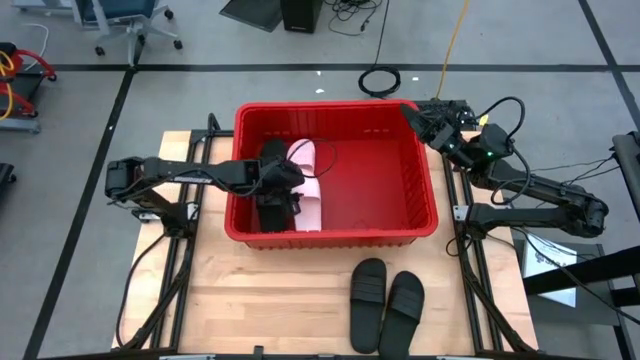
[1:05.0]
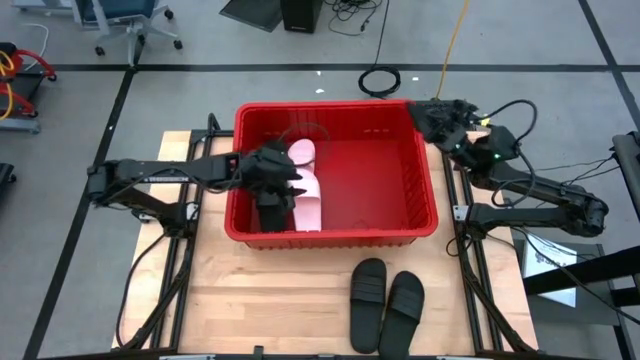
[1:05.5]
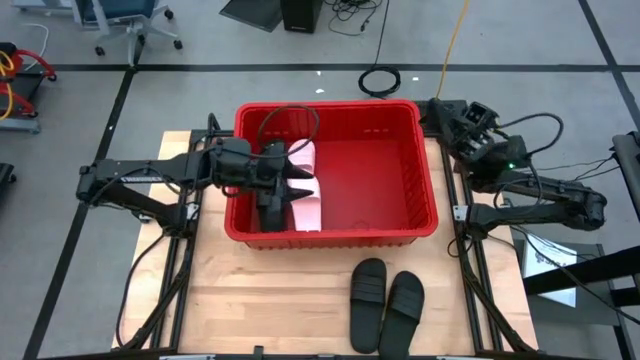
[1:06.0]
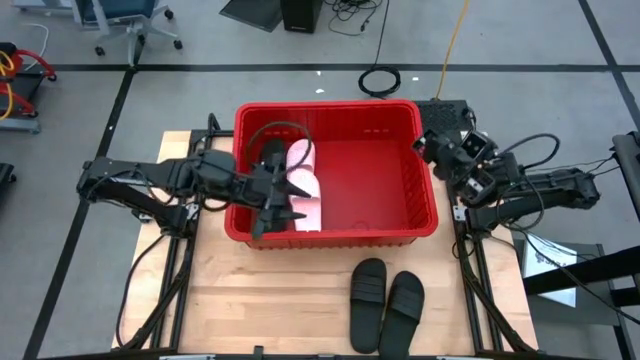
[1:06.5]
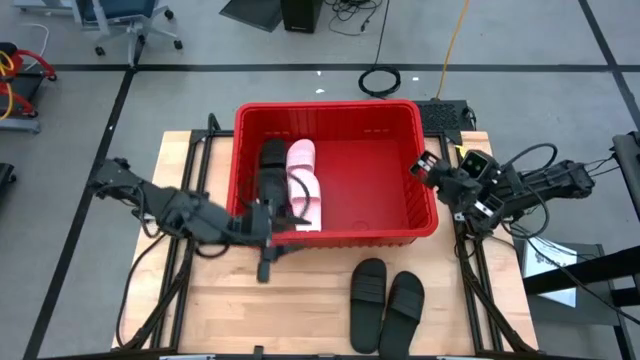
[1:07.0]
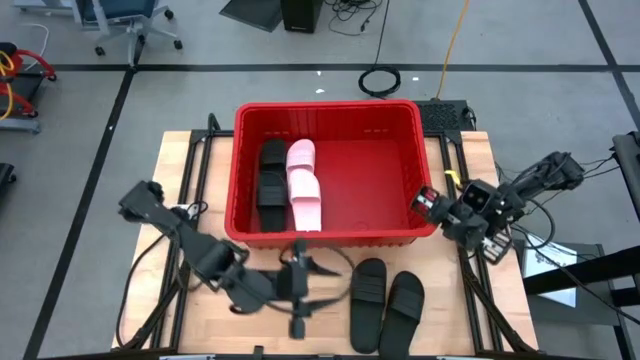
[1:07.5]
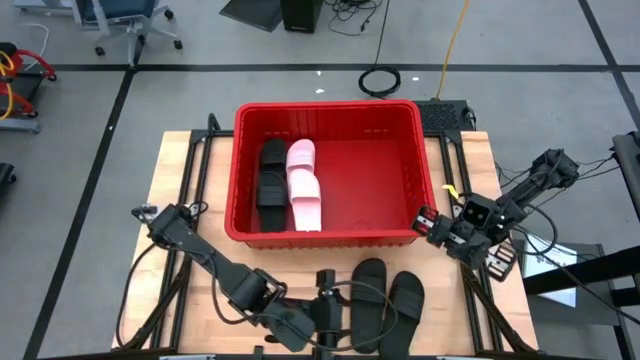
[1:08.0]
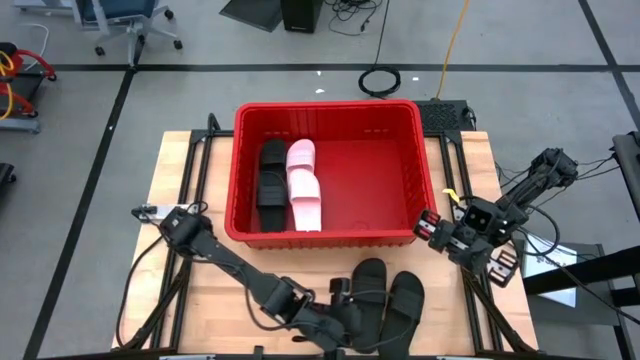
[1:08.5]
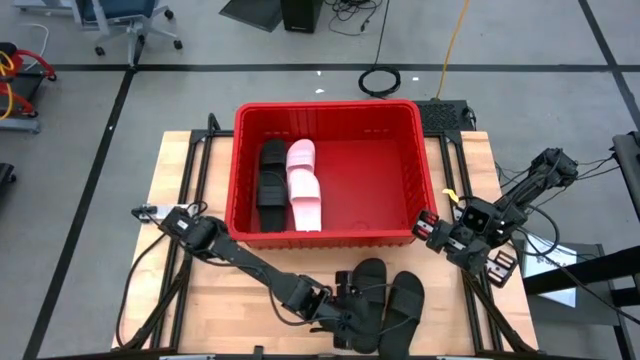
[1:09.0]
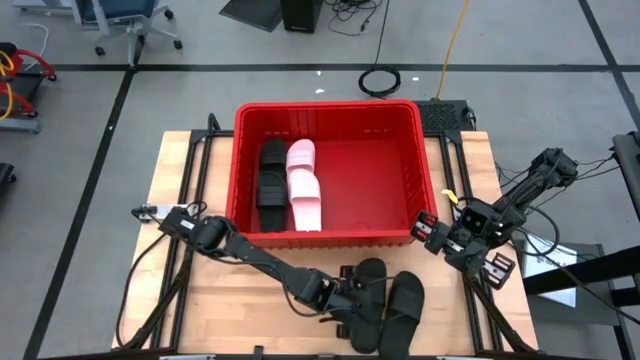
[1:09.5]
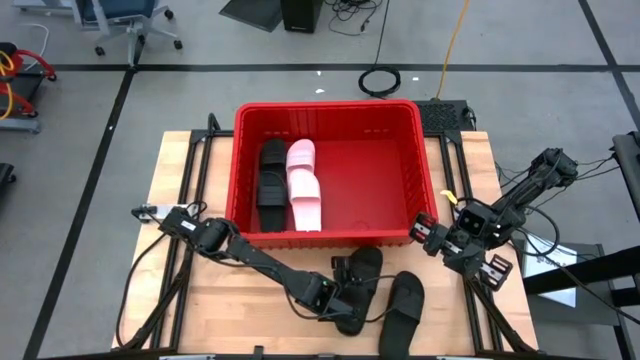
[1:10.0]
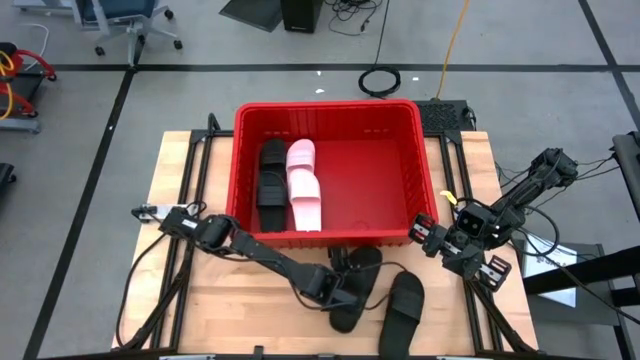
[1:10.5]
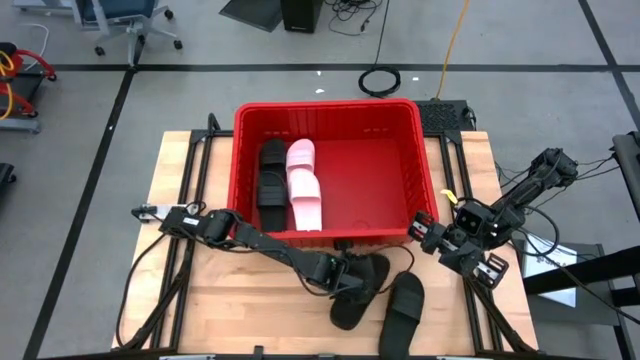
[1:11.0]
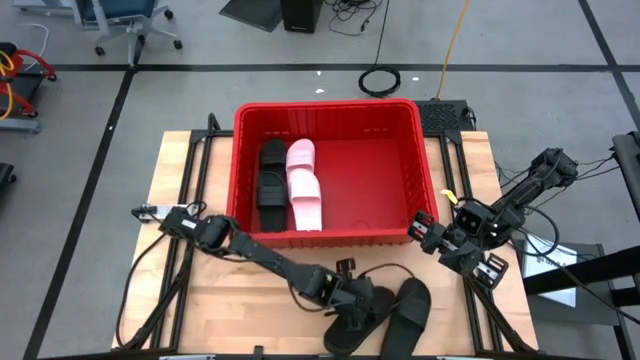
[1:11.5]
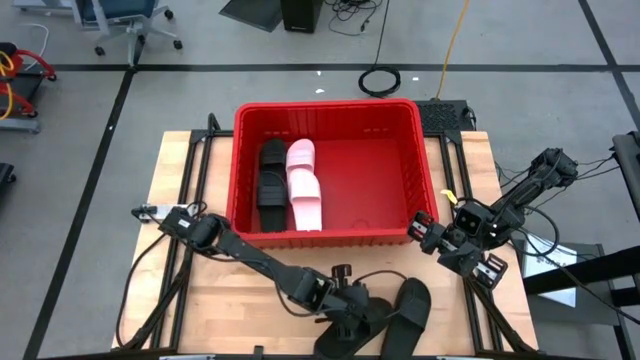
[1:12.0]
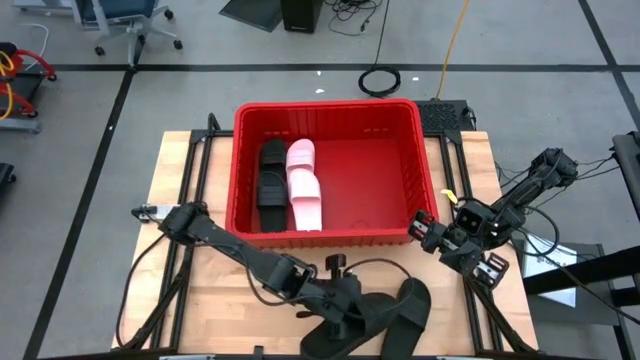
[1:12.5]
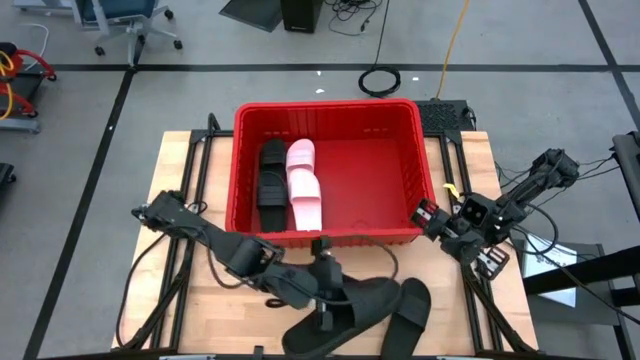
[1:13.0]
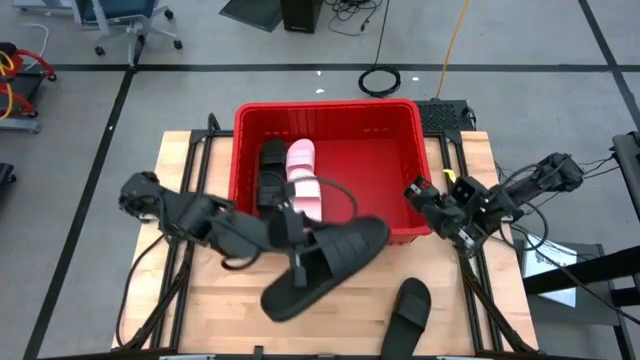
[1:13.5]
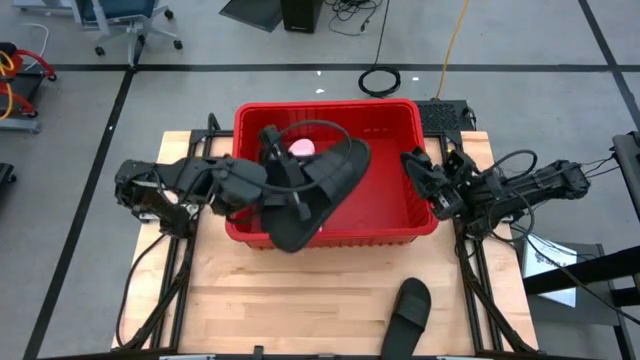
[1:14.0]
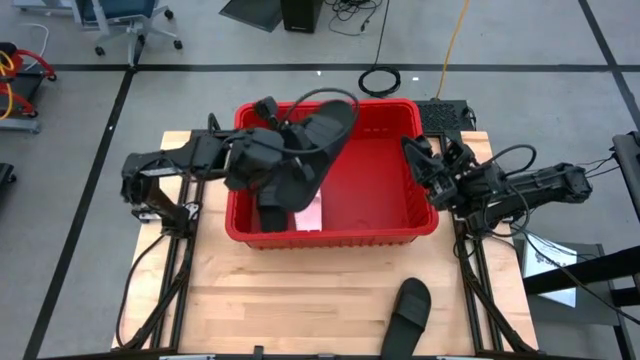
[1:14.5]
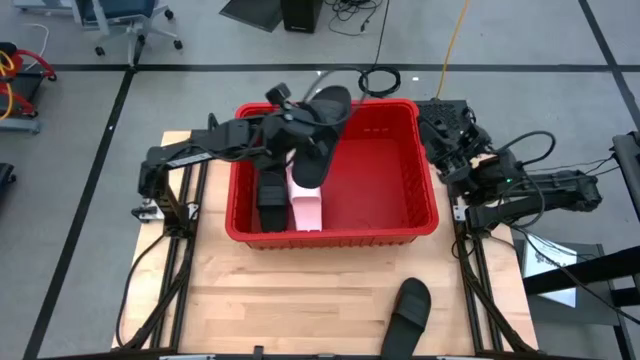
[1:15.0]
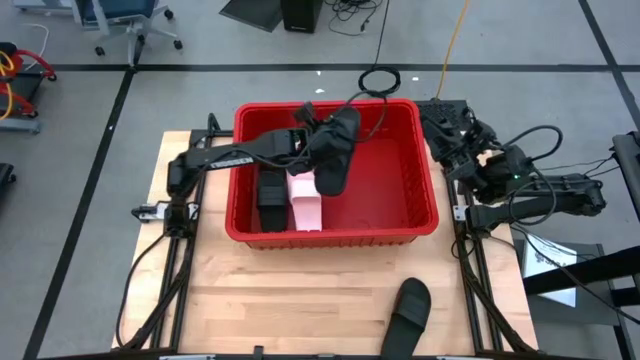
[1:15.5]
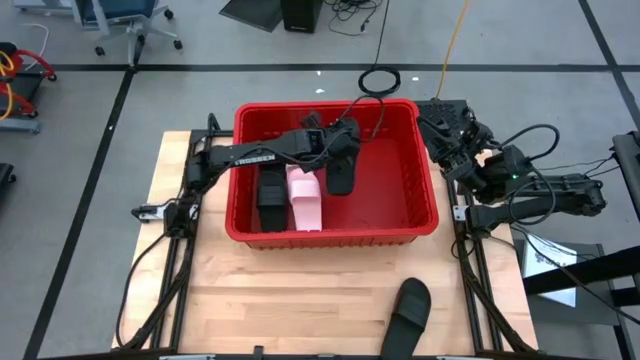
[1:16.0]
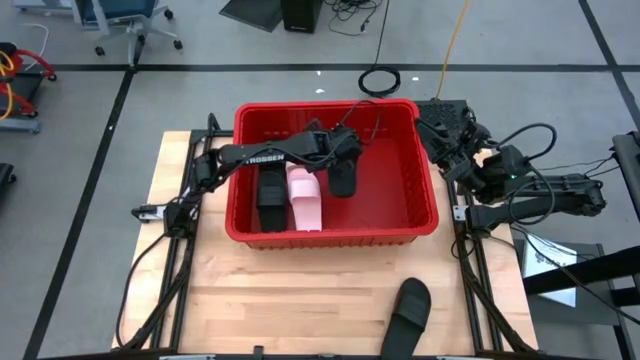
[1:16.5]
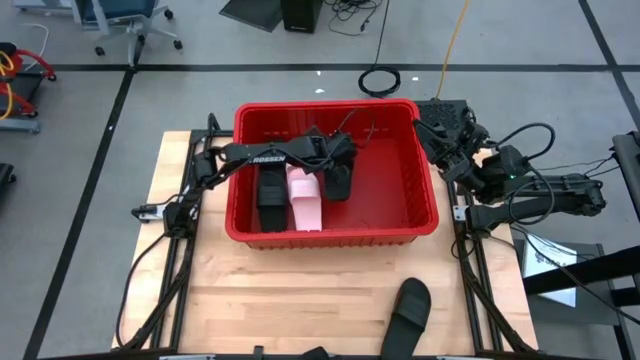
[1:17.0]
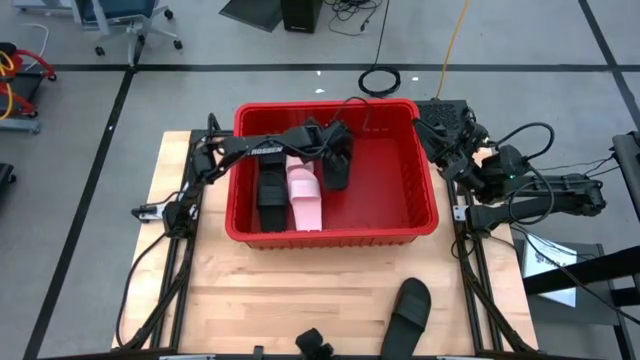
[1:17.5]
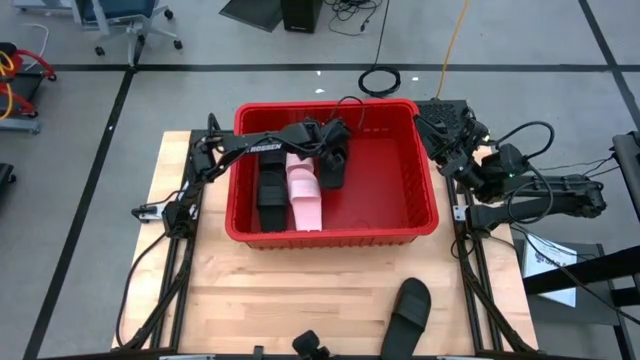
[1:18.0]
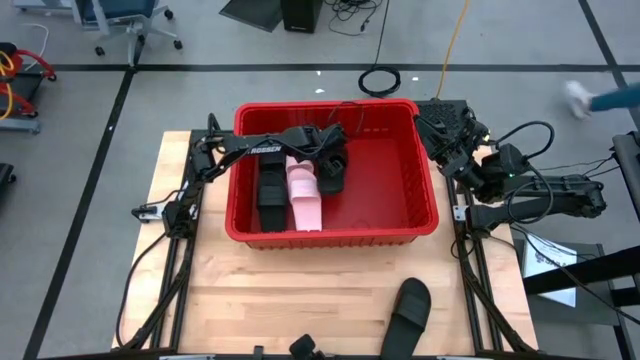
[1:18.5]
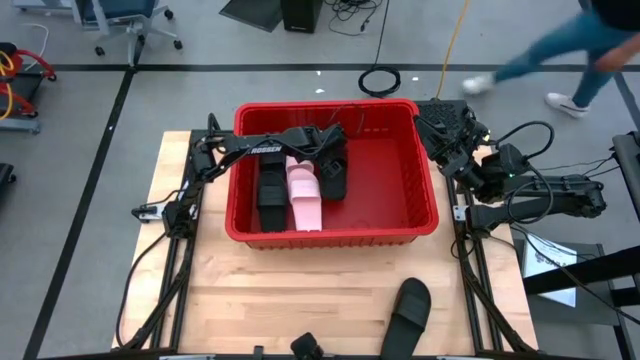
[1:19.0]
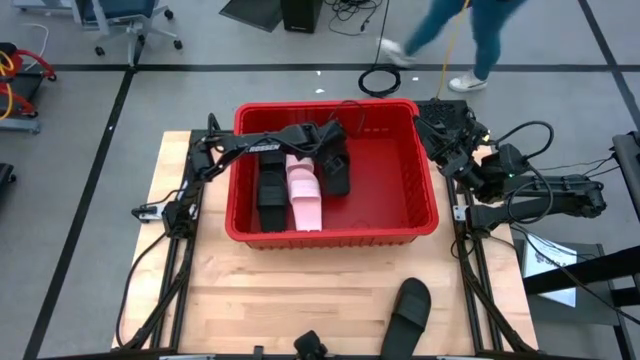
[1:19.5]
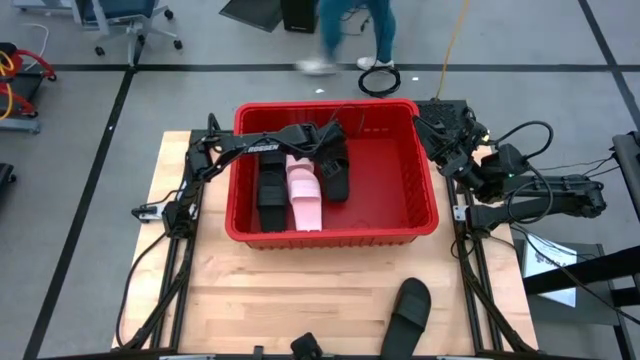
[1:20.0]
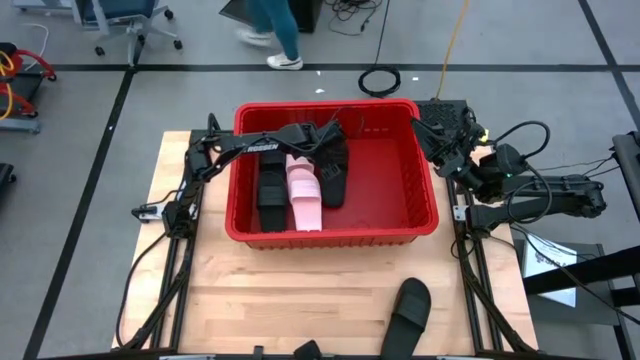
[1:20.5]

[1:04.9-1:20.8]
Task: Pick and place slides into bin
Put the black slide into the red bin
